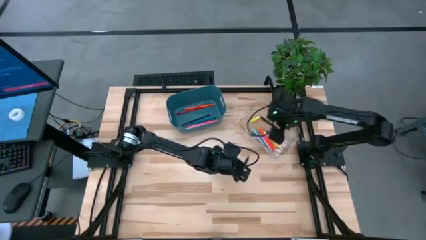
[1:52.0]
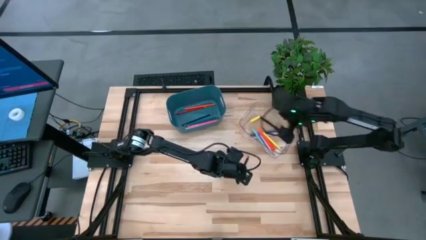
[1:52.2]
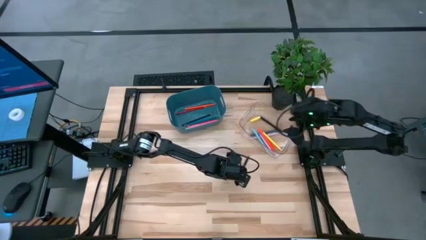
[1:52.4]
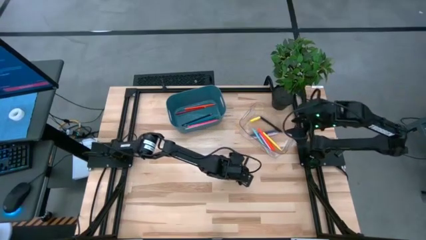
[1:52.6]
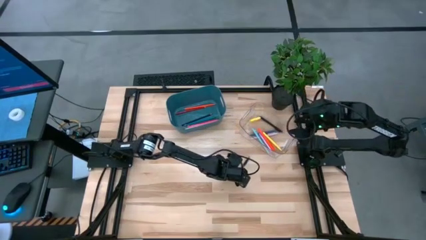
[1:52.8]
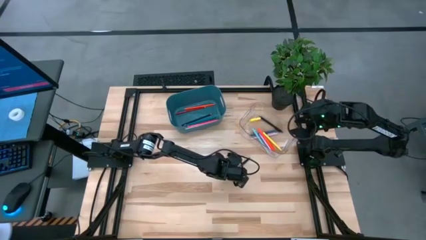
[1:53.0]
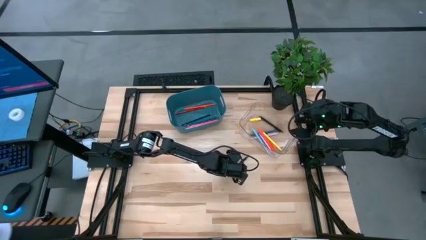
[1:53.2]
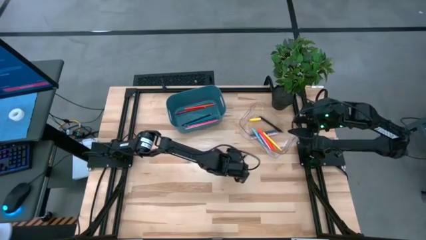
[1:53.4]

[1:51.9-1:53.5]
Task: Sort pens & pencils
Put the black pen into the transparent bin

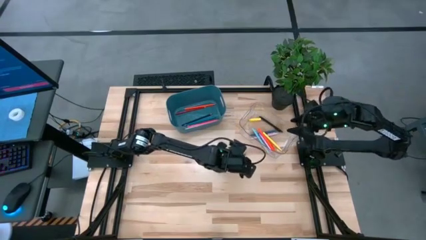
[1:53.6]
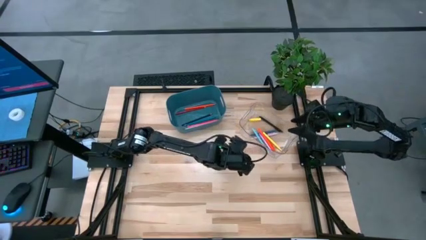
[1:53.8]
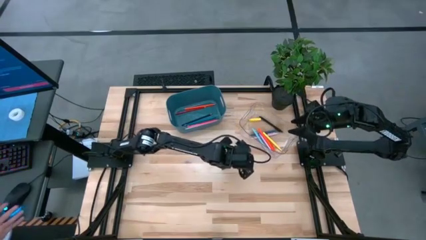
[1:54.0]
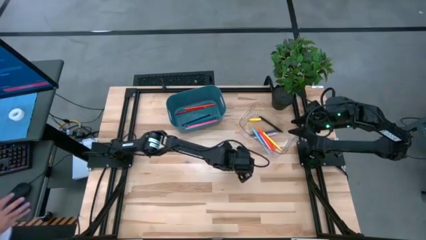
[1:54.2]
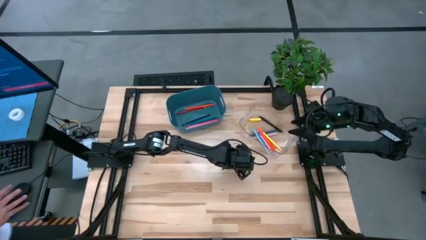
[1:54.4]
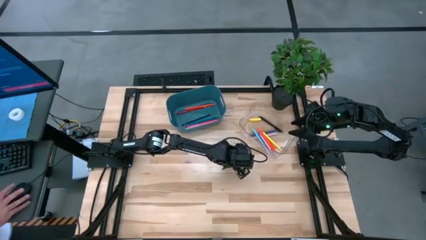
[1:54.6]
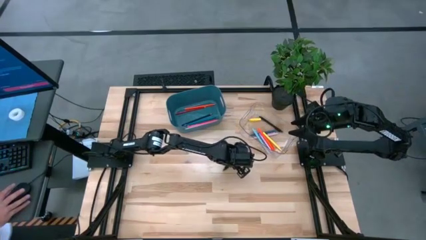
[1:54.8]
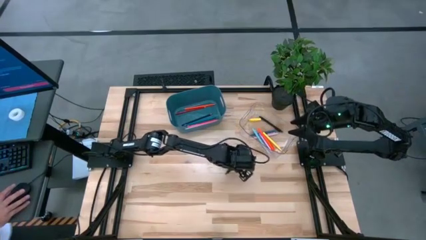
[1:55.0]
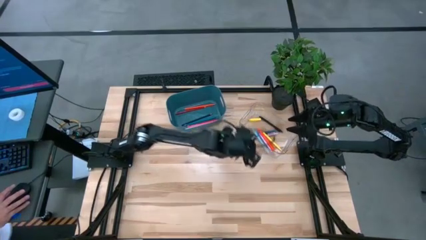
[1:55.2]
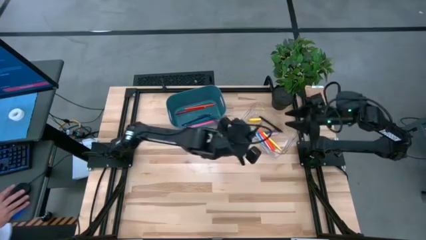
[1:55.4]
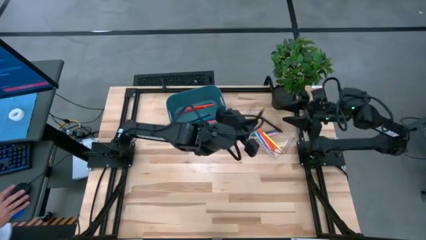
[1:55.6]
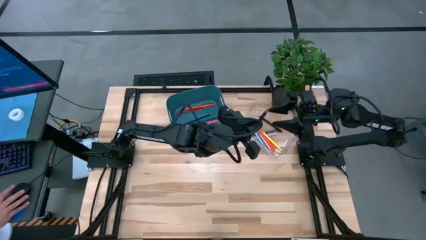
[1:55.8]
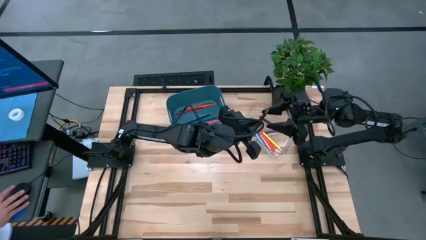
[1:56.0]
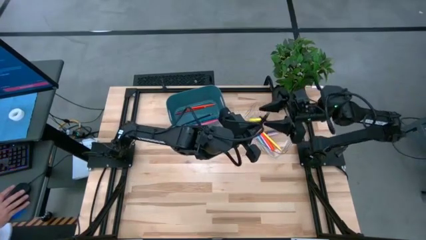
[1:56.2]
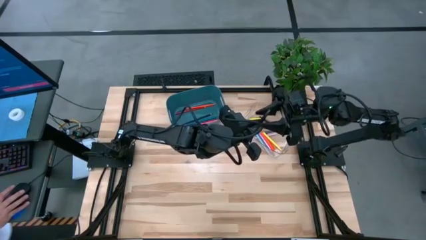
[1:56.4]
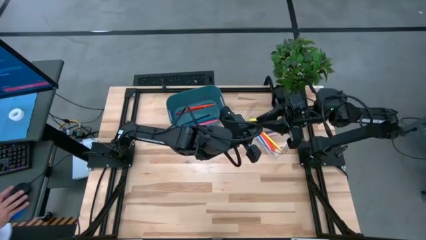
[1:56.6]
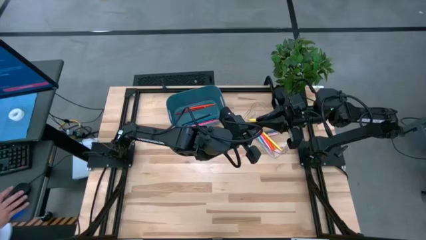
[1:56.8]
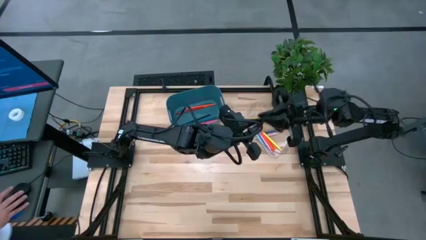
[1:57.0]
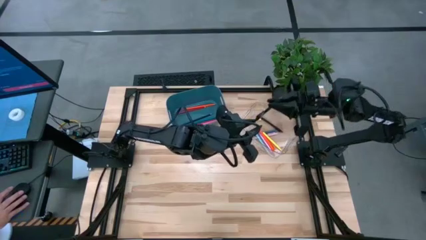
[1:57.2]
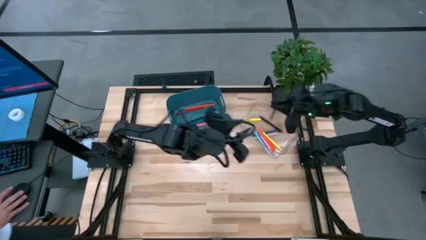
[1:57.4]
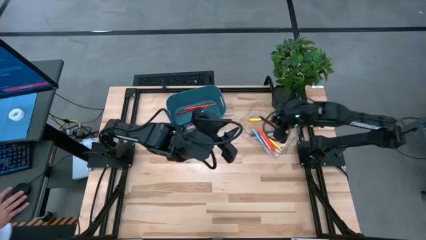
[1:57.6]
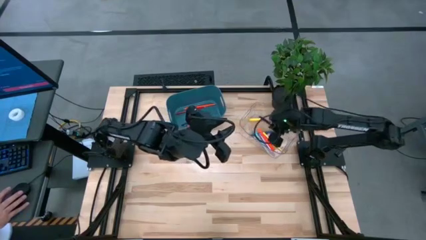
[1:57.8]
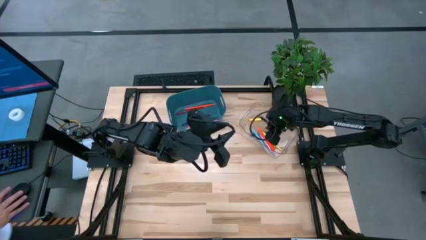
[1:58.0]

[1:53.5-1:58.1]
Put the black pen into the transparent bin

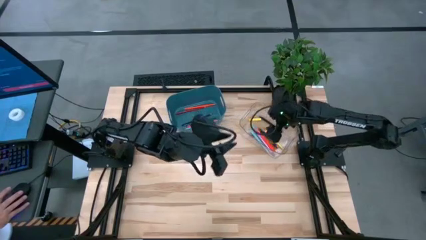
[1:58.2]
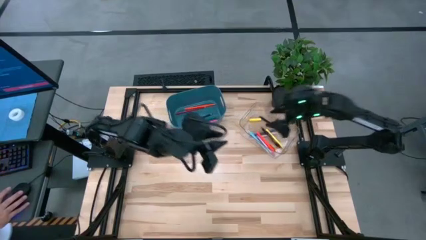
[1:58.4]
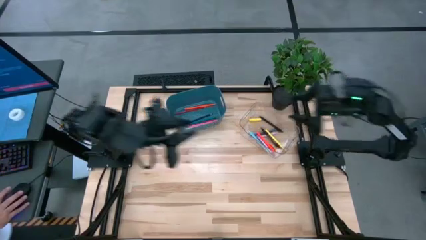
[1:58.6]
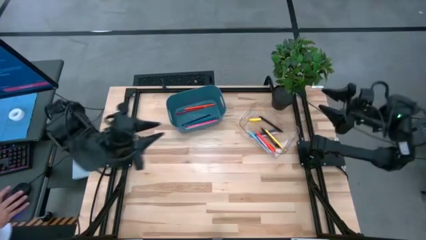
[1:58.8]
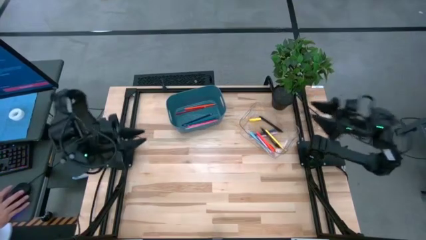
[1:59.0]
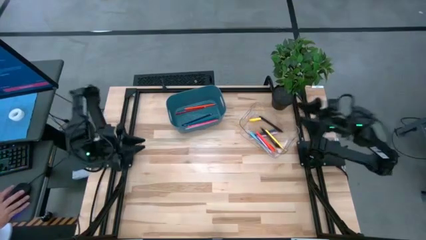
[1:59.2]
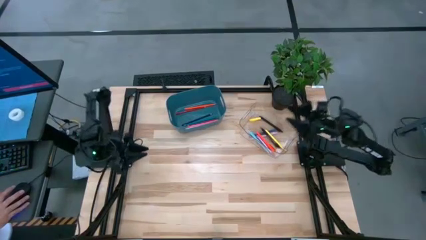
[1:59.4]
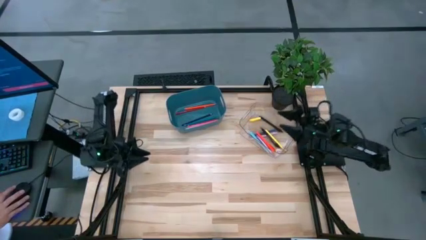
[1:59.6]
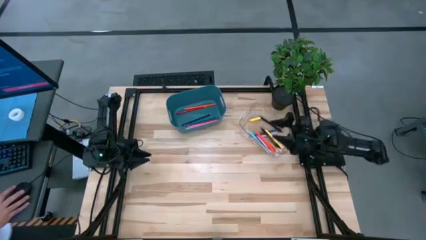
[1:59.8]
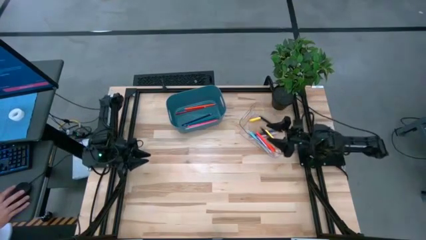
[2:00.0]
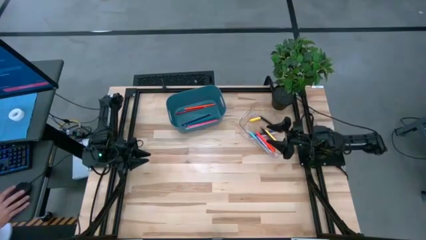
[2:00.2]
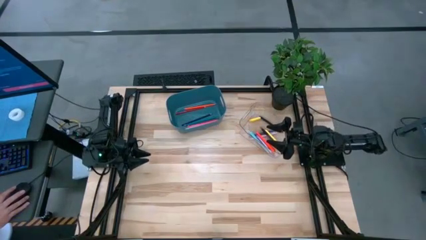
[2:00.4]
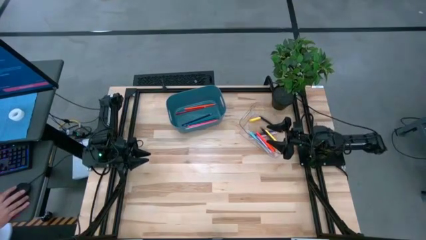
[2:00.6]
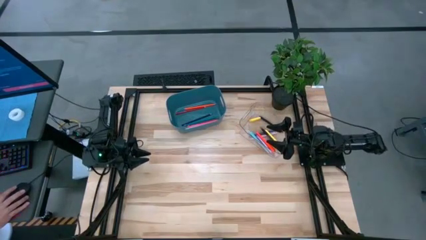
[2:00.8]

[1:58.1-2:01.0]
Return to Home Position

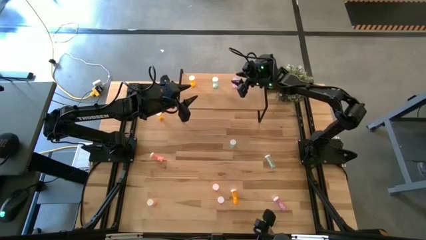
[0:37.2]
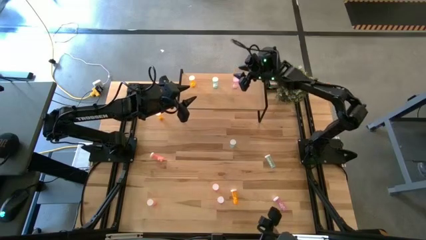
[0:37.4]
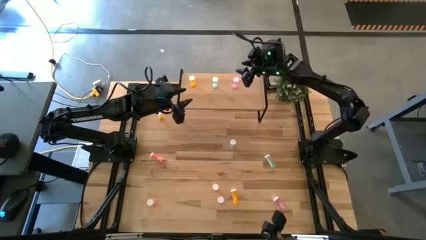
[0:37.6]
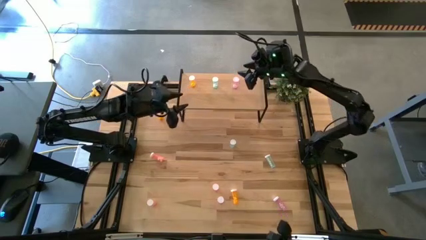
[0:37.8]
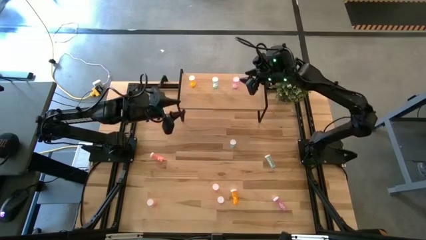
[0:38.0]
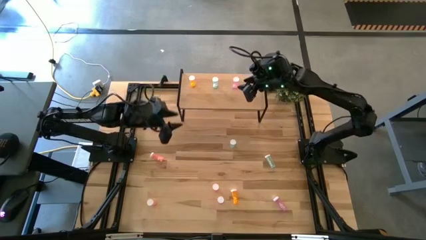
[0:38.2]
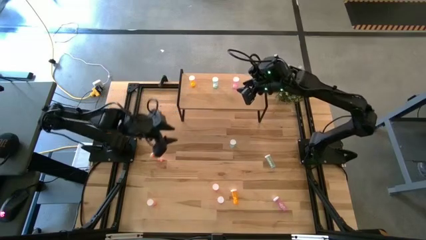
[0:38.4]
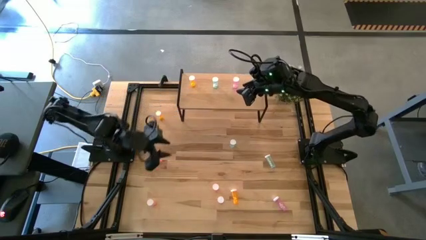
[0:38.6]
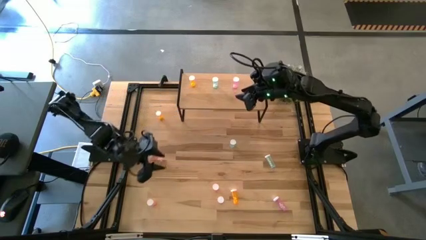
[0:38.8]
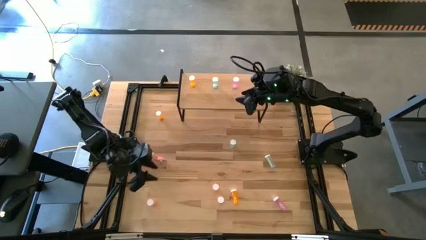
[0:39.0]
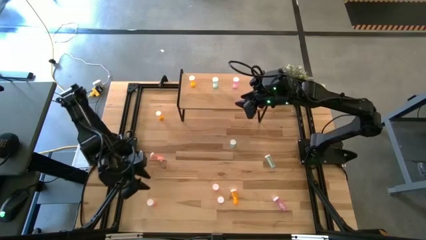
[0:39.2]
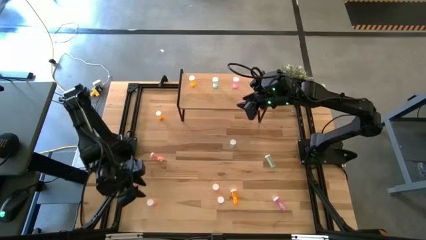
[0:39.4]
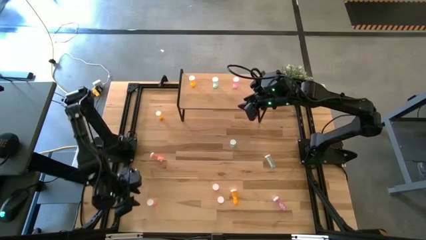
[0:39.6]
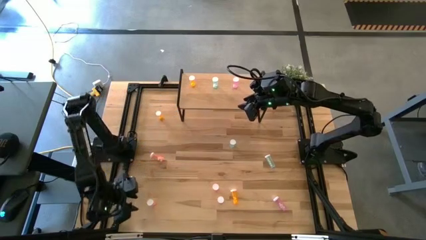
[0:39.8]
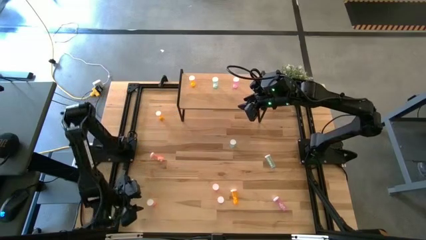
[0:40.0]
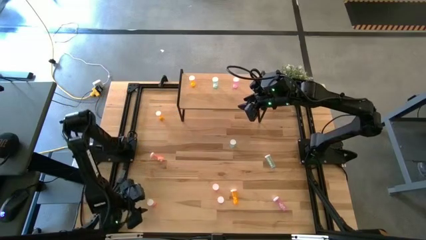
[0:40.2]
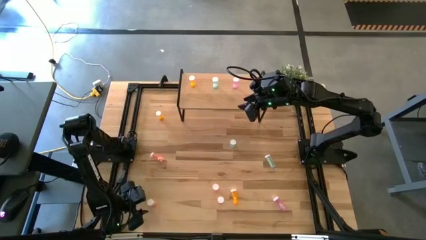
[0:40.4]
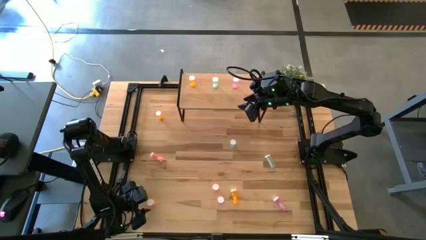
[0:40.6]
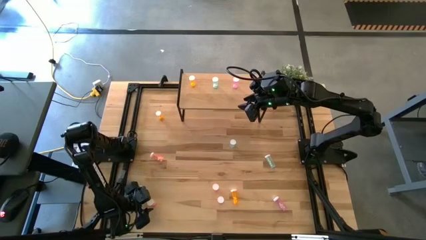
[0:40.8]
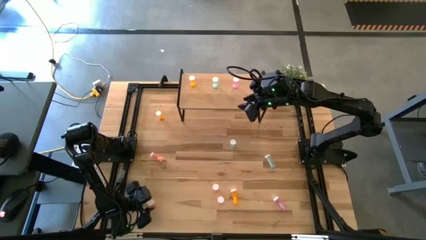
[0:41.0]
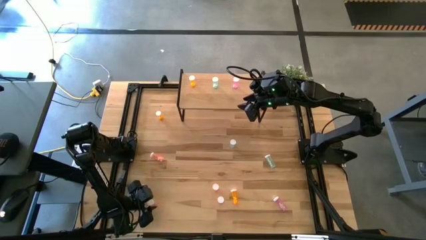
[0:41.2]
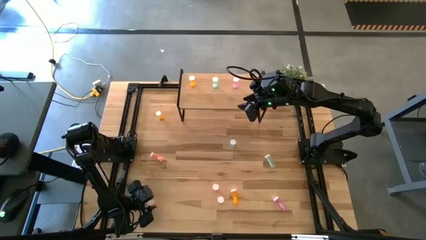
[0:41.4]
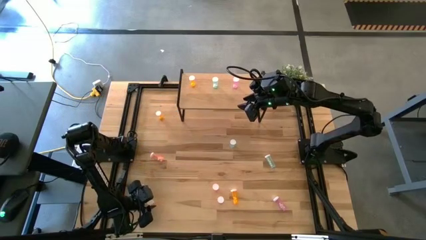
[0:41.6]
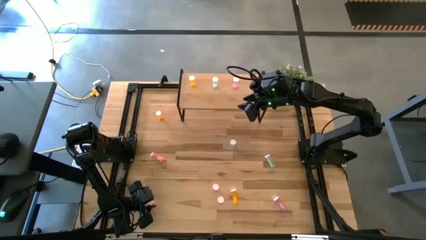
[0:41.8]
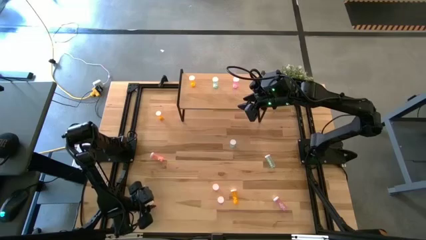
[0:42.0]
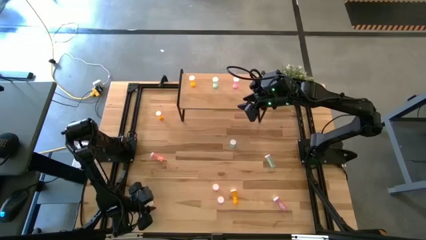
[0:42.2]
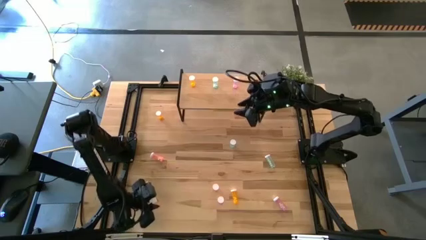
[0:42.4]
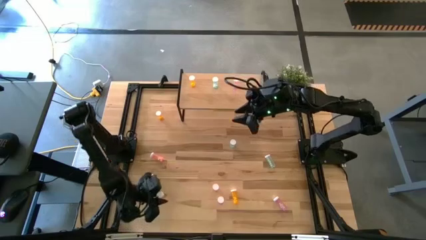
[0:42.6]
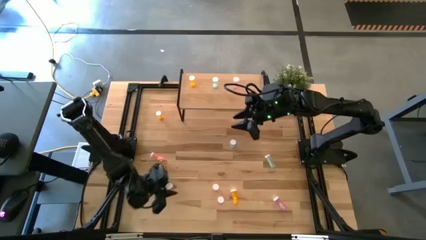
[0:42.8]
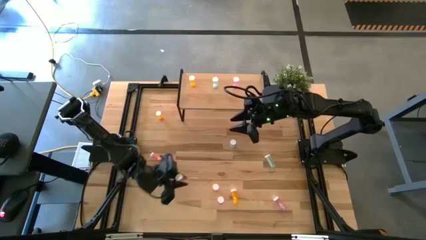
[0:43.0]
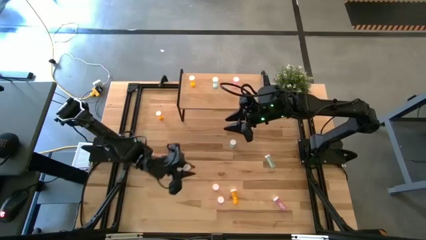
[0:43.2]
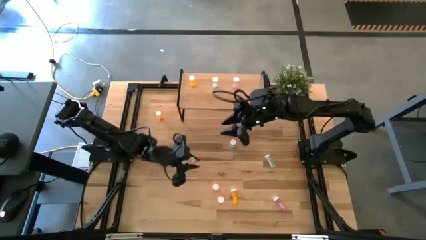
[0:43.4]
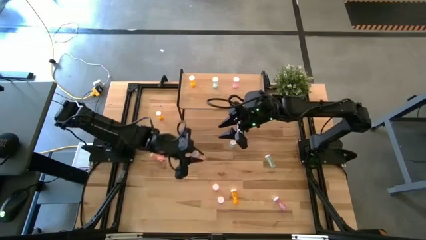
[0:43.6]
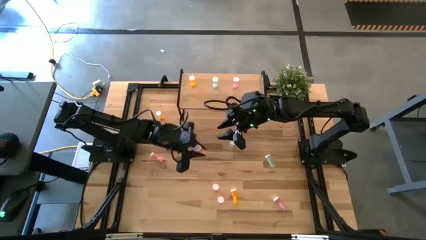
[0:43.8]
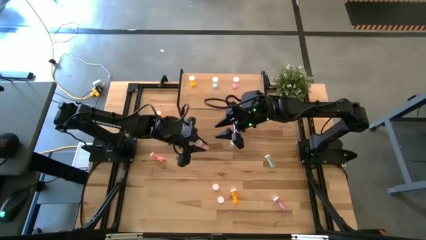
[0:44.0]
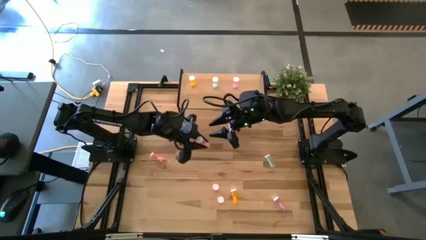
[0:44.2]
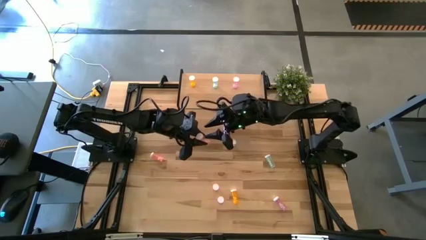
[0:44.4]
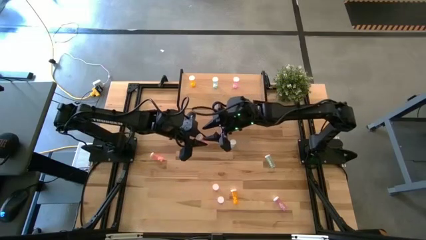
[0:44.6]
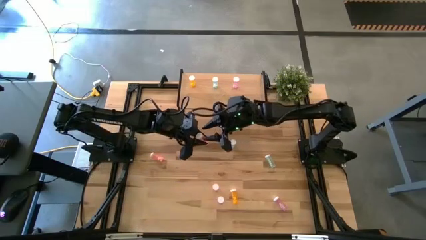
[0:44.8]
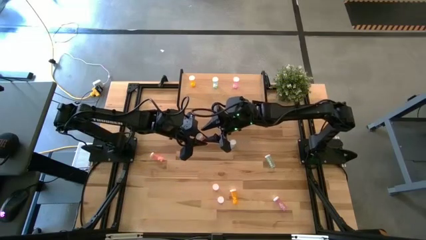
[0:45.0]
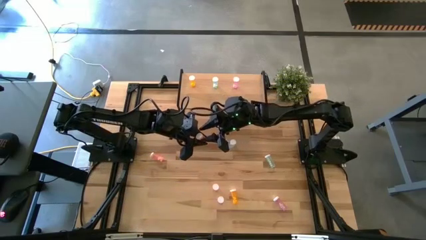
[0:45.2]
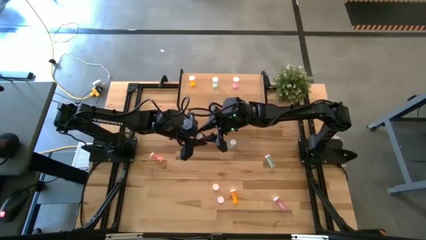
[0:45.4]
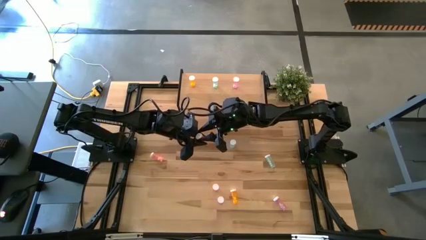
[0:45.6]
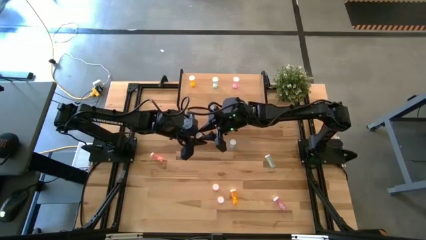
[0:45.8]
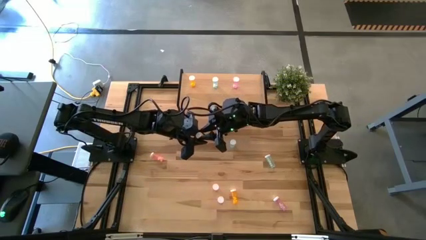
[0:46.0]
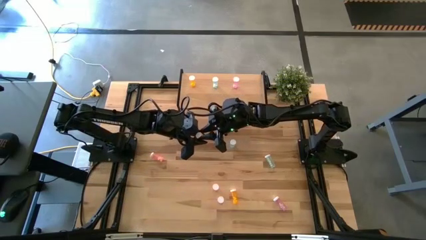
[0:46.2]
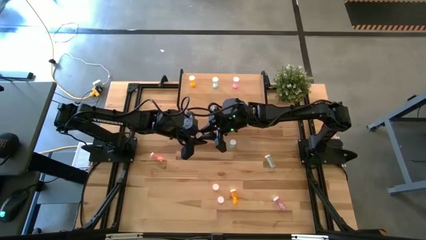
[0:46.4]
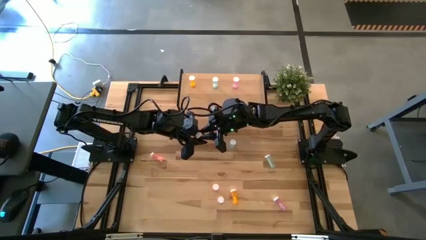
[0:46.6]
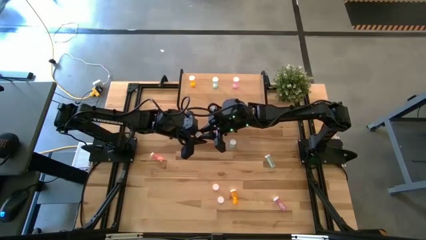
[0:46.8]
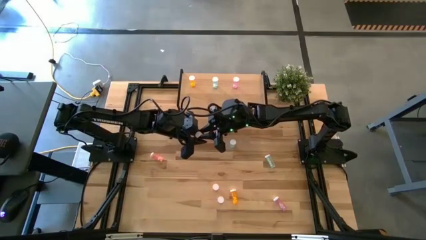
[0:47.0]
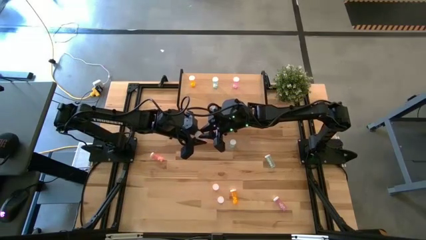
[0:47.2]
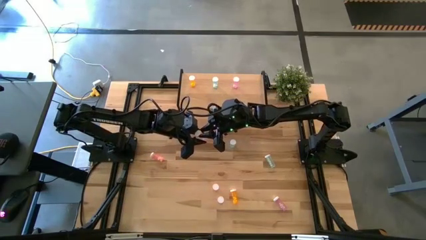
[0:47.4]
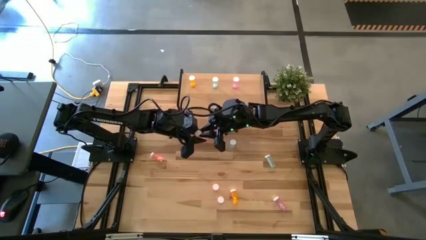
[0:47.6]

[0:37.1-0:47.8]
Task: Pick and place medicine bottles onto shelf by color
Put the bottom left pink pill bottle on the shelf
